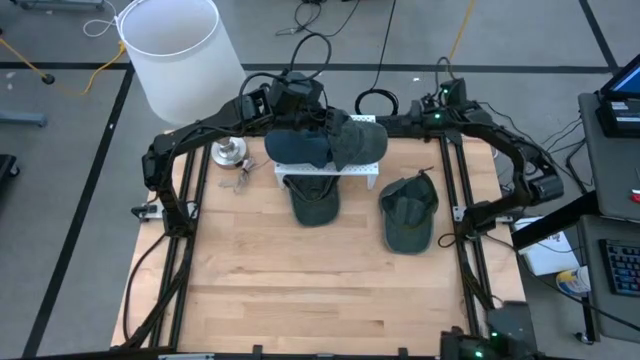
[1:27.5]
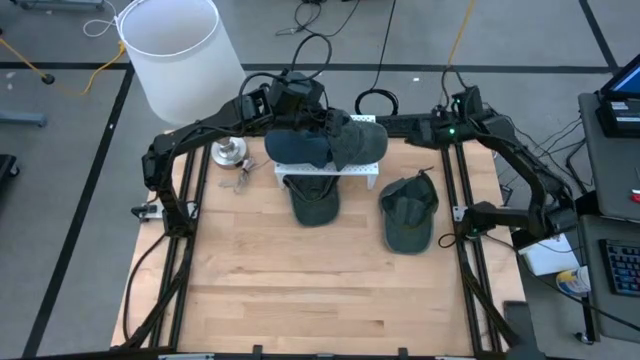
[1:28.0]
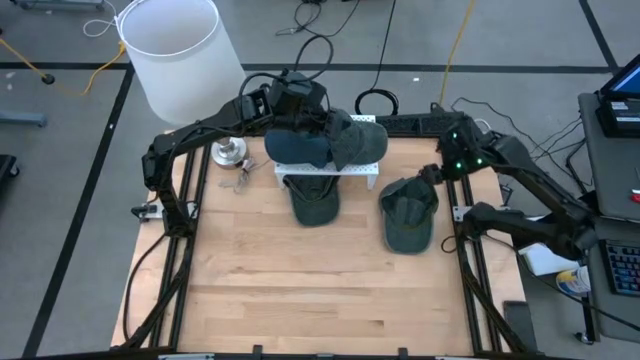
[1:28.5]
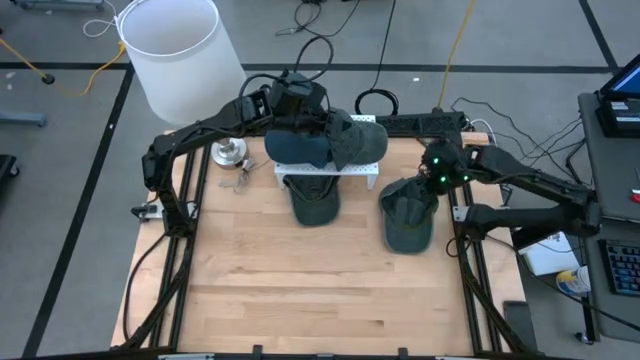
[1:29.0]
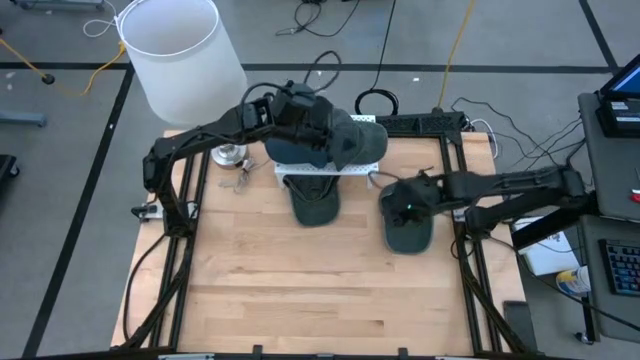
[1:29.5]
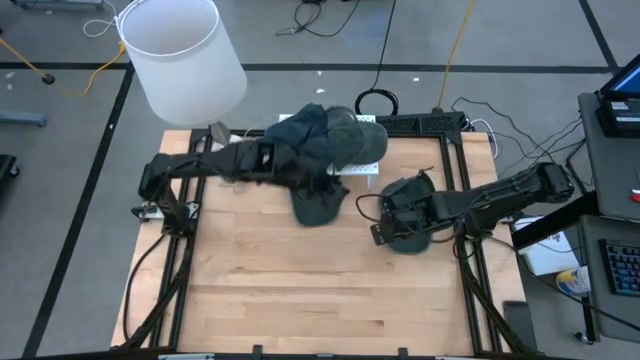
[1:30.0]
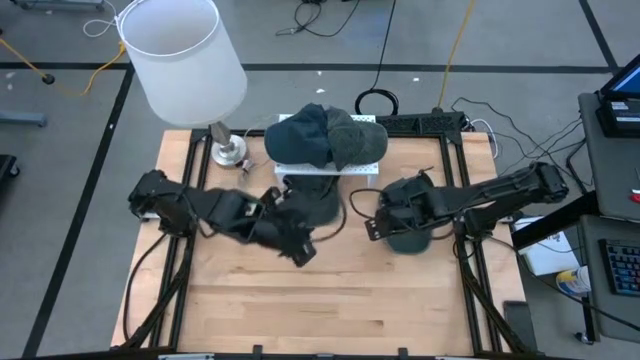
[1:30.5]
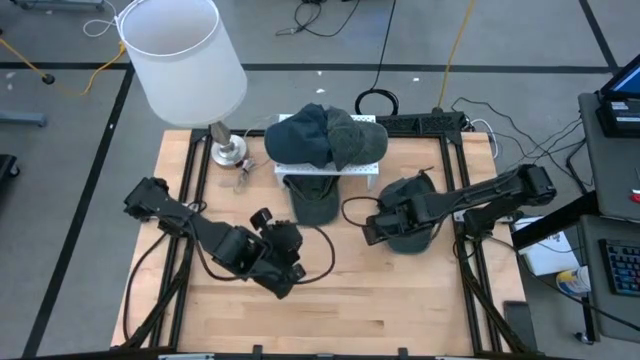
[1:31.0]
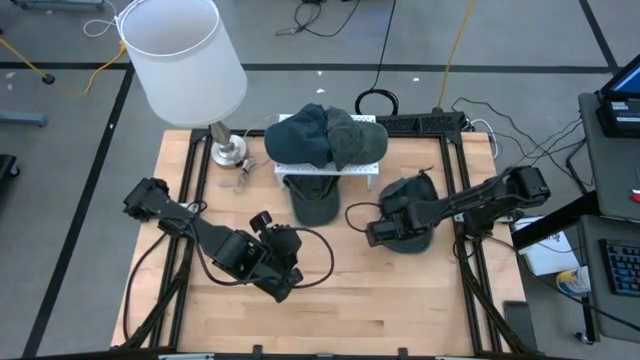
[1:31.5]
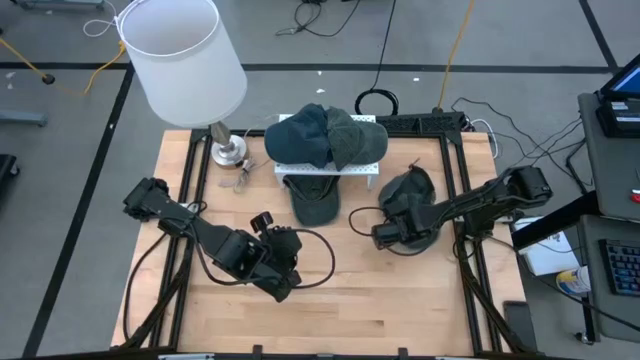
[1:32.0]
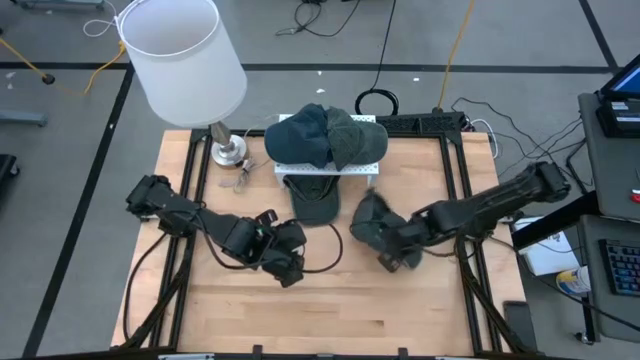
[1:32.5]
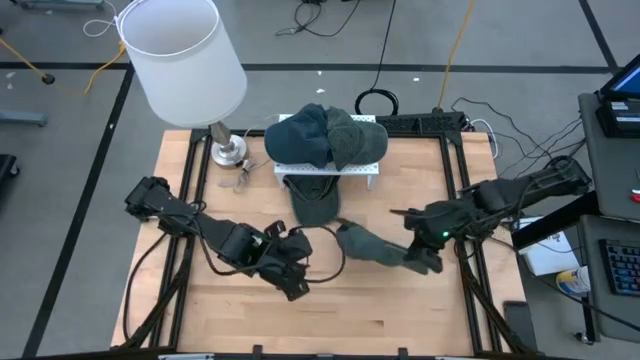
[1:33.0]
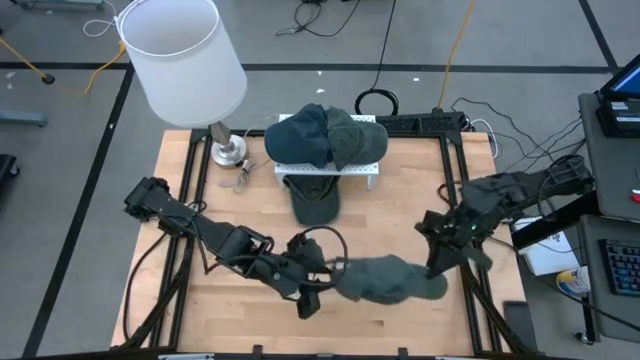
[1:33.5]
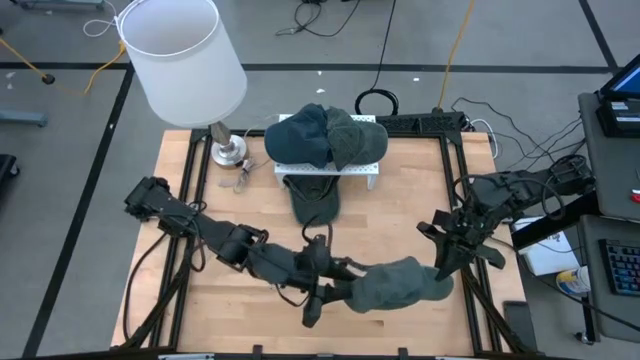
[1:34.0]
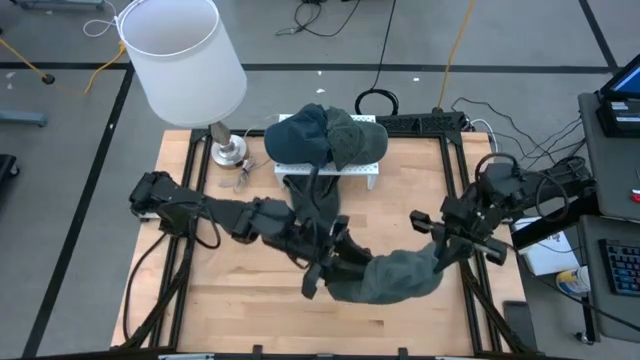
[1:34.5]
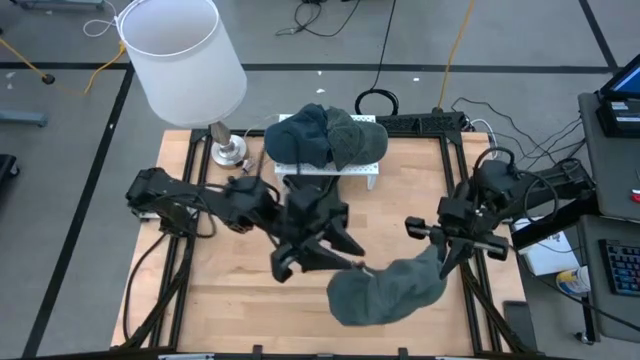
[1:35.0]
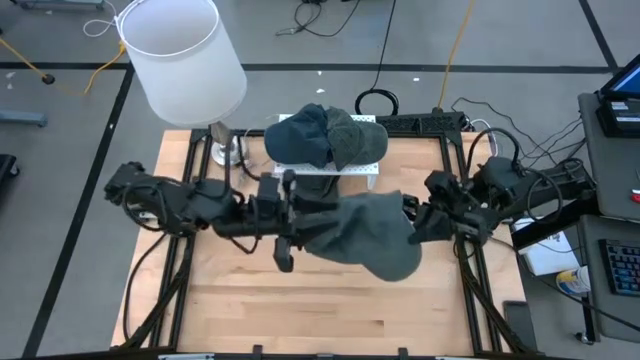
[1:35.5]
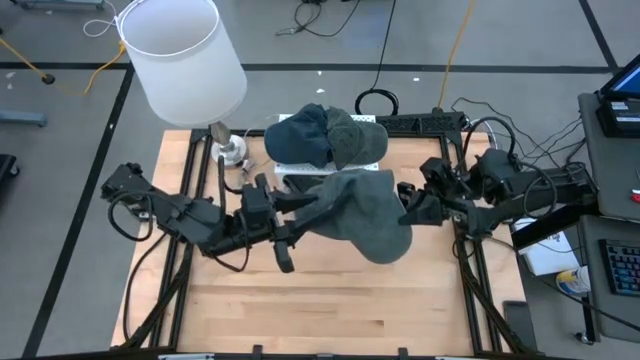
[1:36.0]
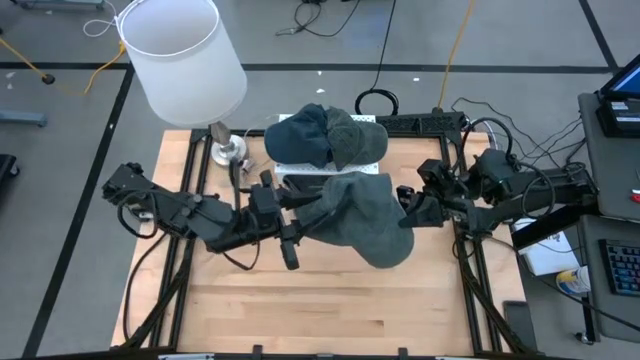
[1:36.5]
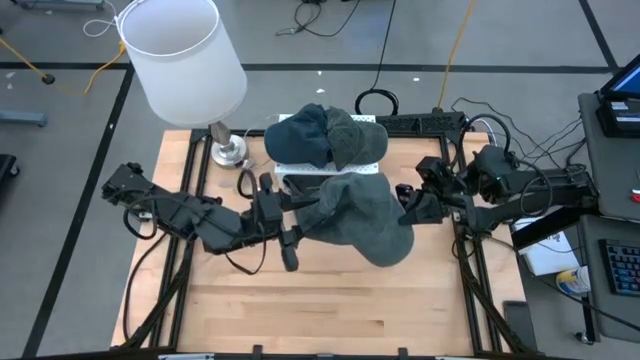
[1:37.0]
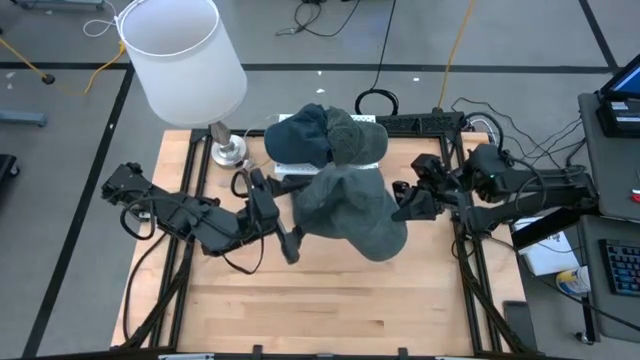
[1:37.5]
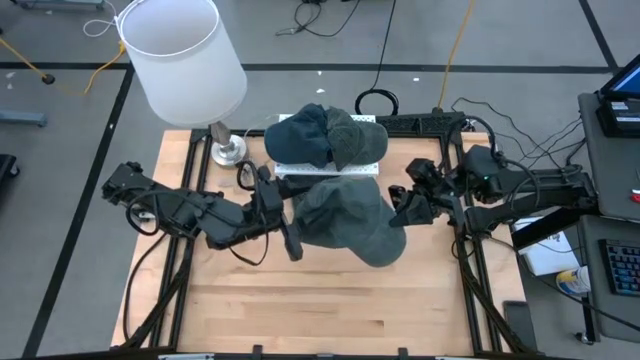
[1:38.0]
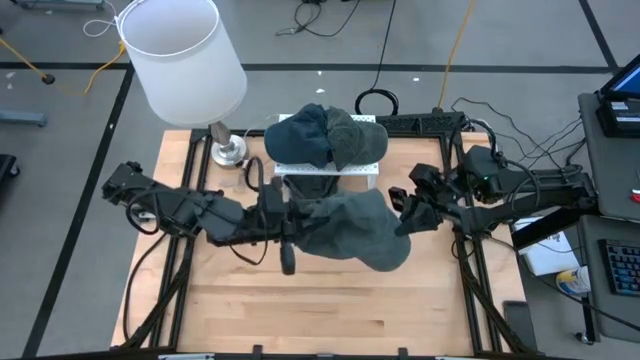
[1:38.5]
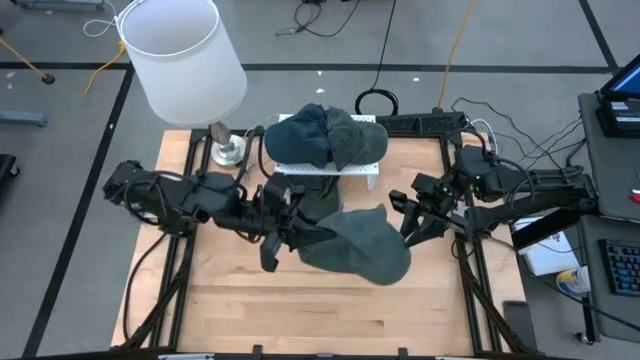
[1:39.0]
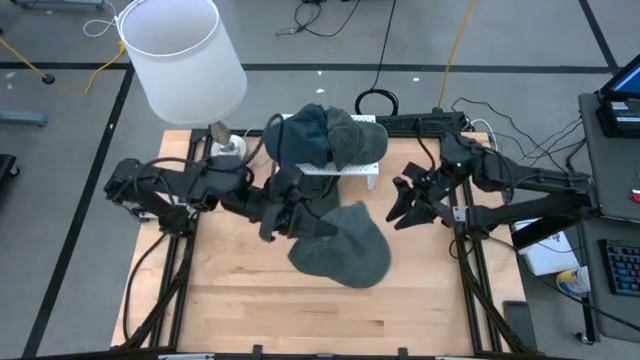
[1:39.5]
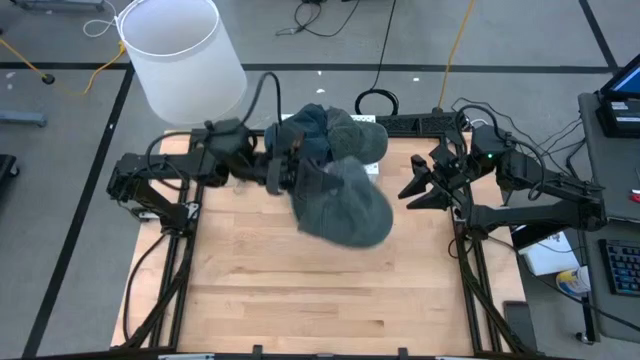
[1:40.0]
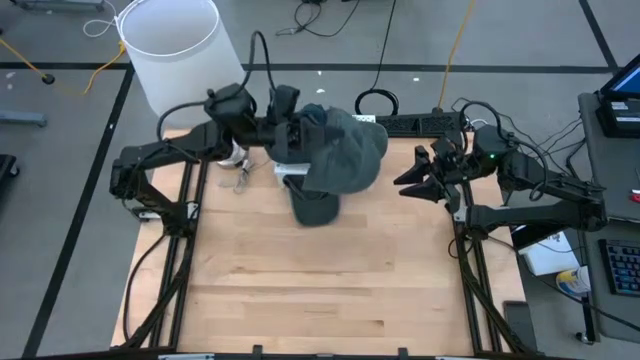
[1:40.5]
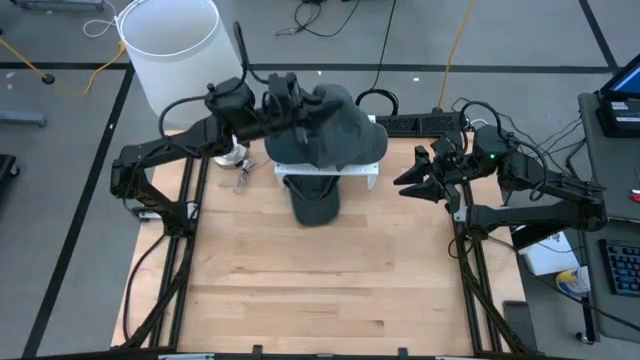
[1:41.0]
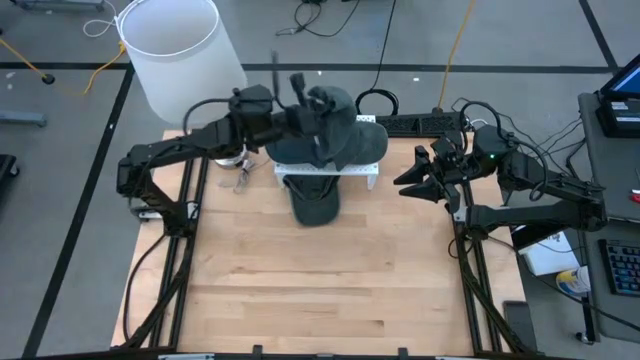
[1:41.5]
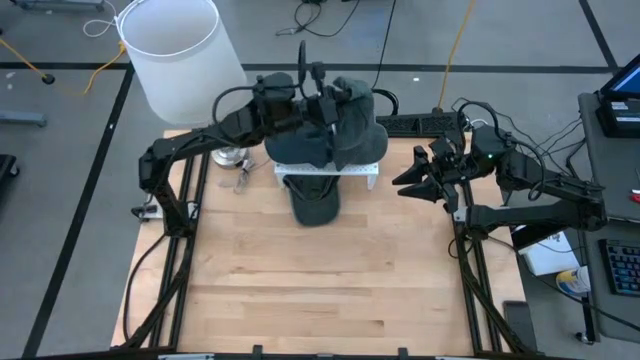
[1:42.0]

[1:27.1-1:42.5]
Task: Pick & Place hat
Stack the right black cap on the black cap on the shelf

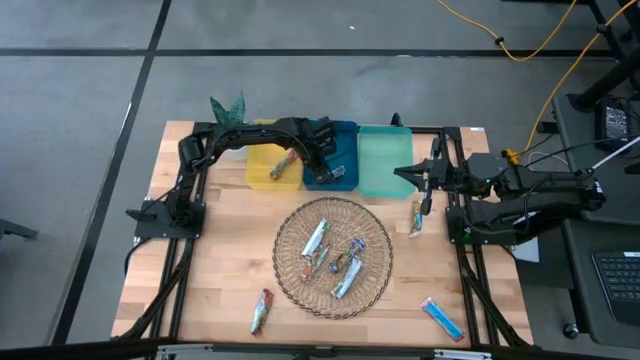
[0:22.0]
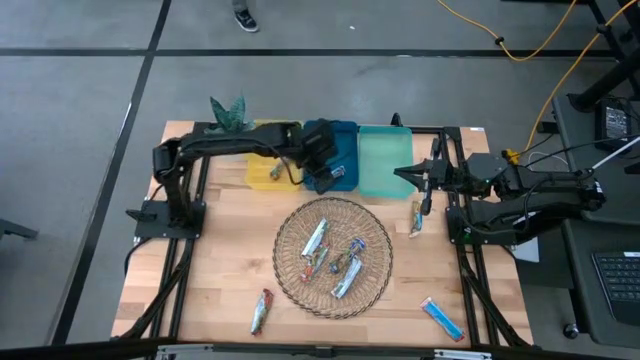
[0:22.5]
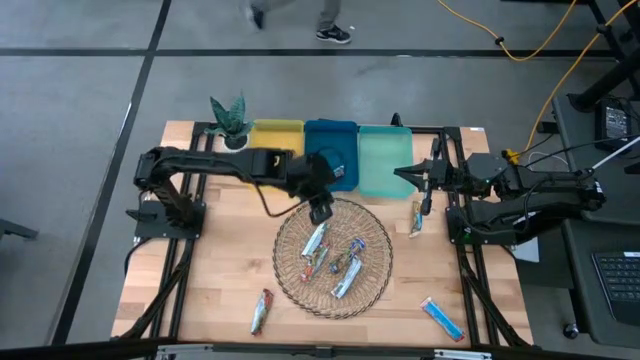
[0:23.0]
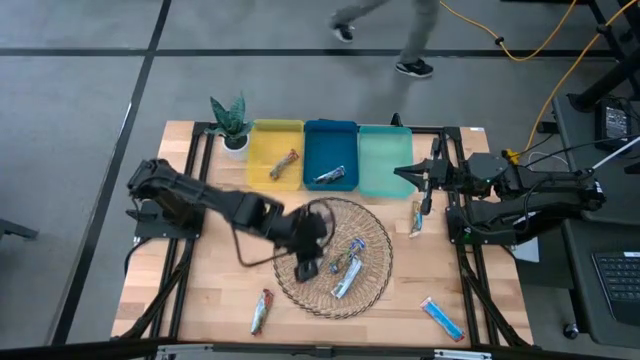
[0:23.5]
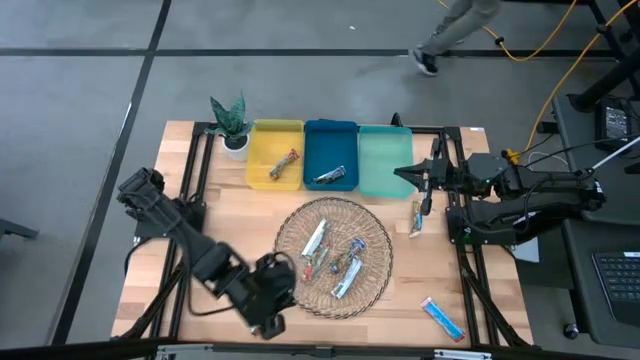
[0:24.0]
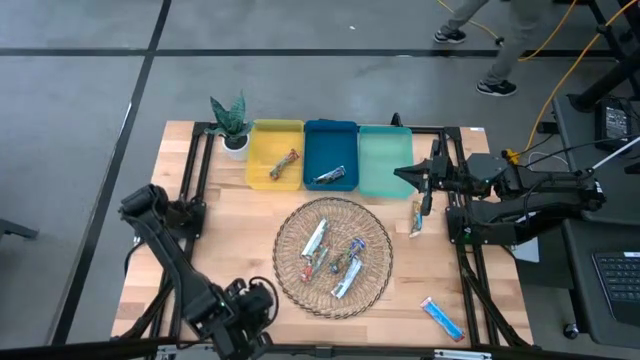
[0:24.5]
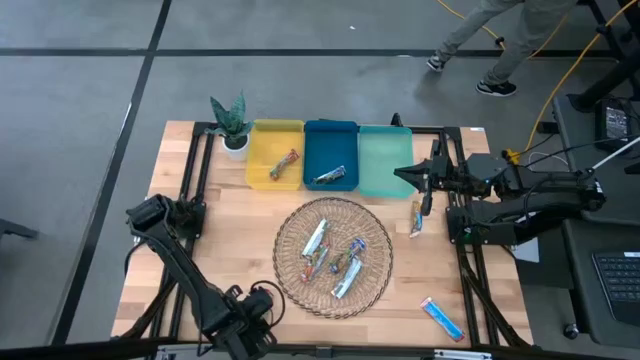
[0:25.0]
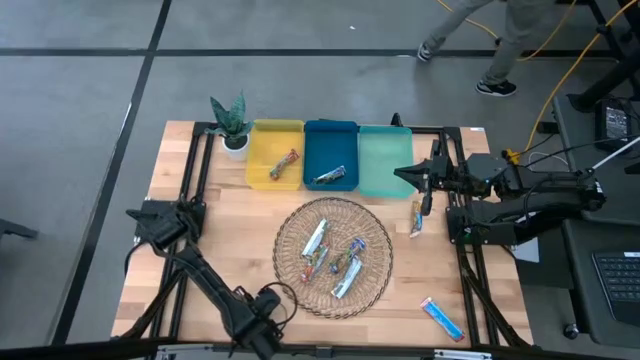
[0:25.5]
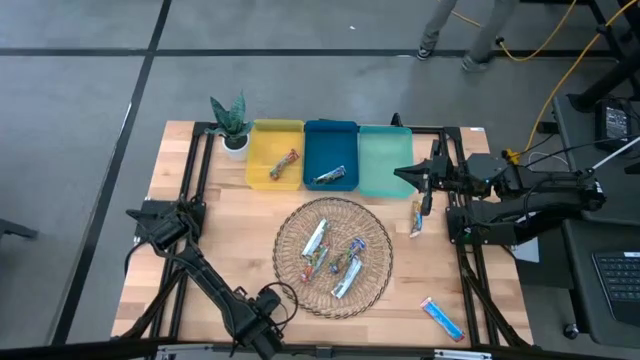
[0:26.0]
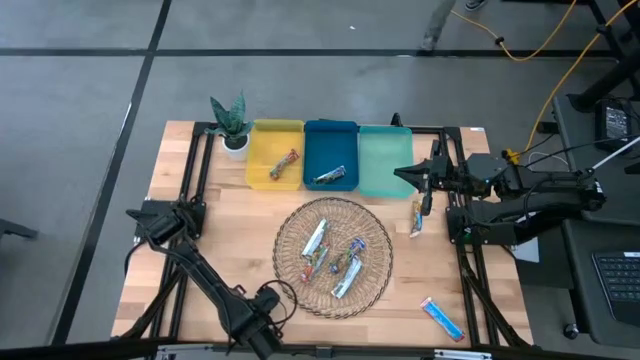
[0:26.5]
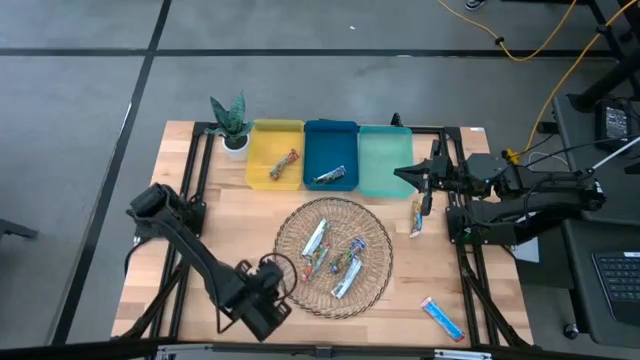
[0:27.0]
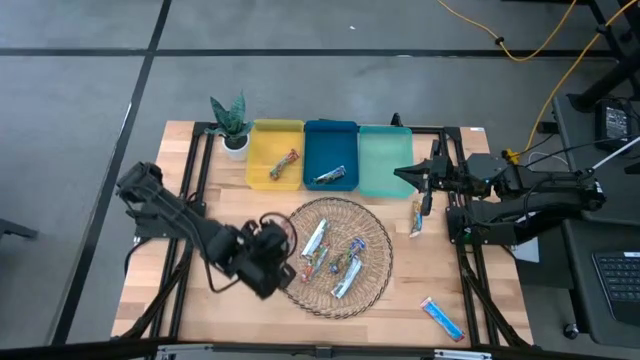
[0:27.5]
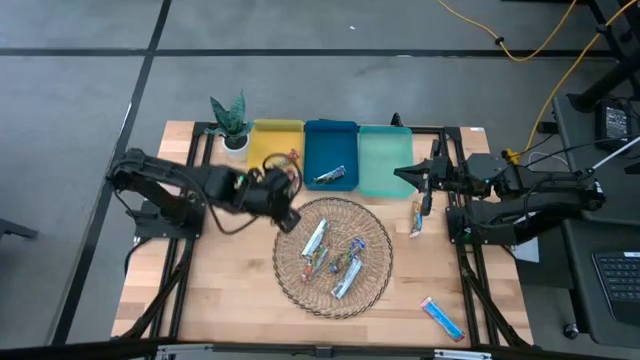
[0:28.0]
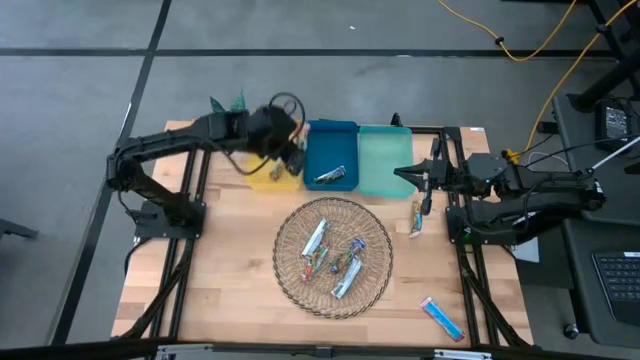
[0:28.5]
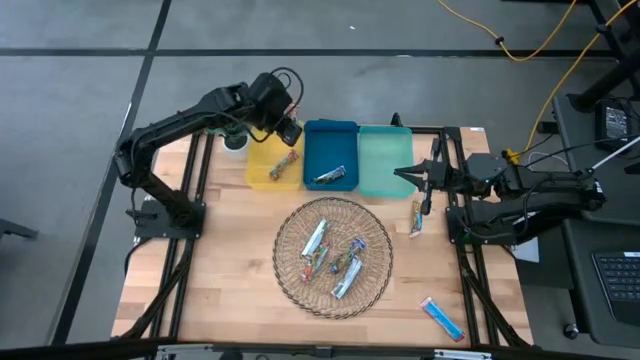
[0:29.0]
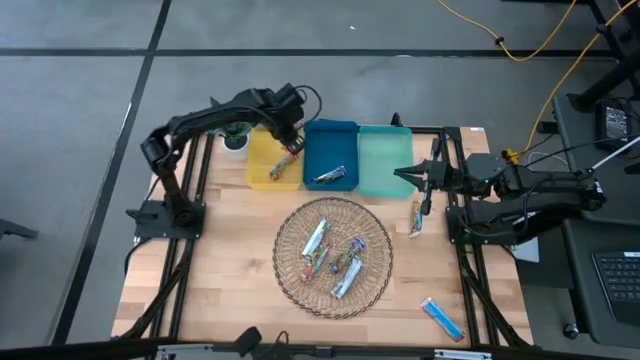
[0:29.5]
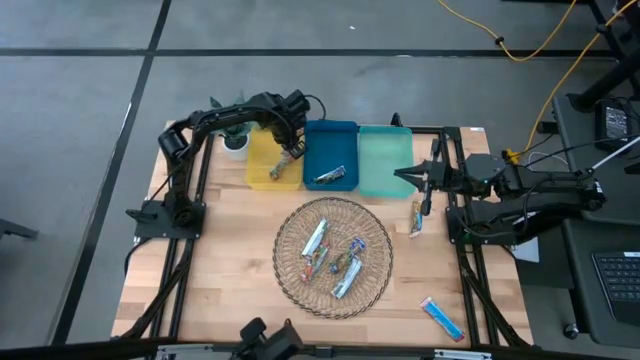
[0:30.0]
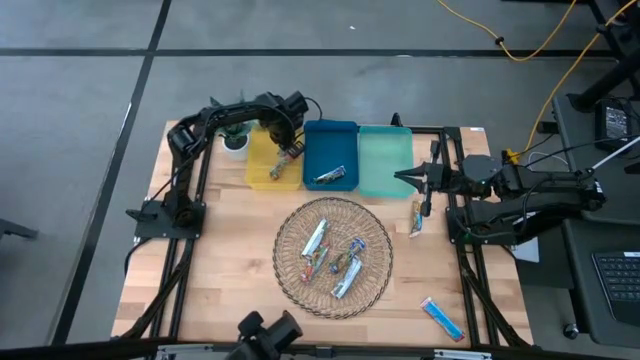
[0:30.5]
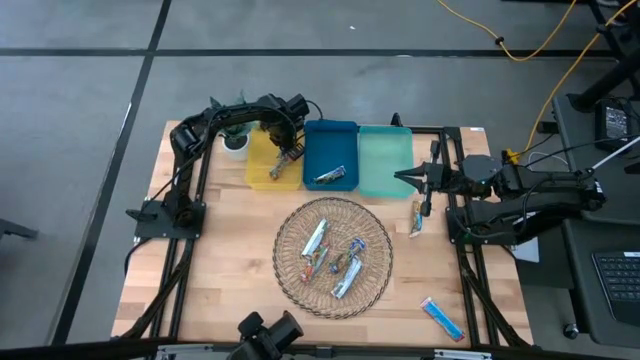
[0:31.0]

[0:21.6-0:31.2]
Task: Pick and place Granola Bars by type
Put the red granola bar into the yellow bin
